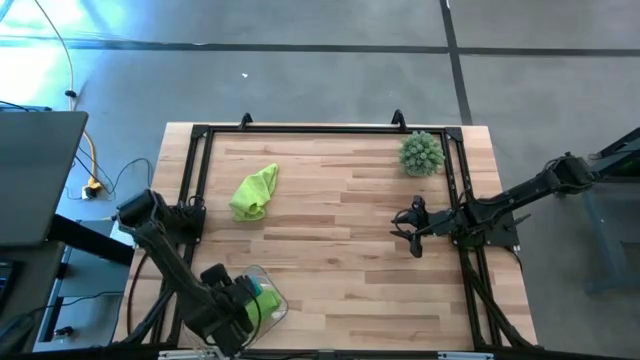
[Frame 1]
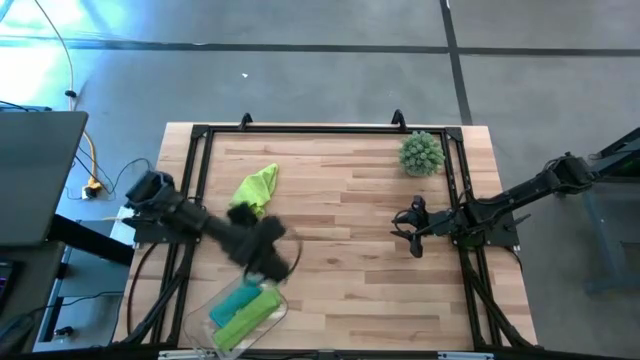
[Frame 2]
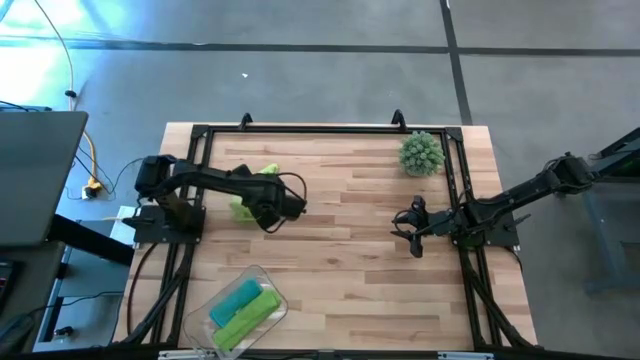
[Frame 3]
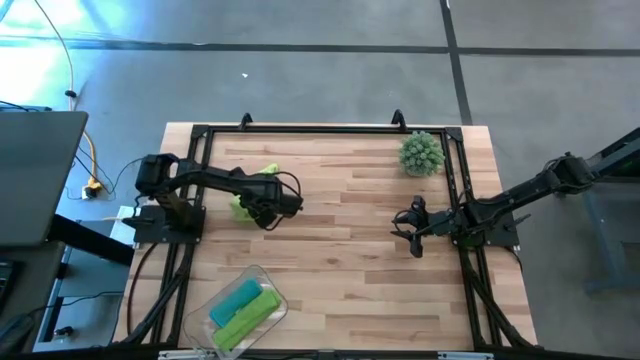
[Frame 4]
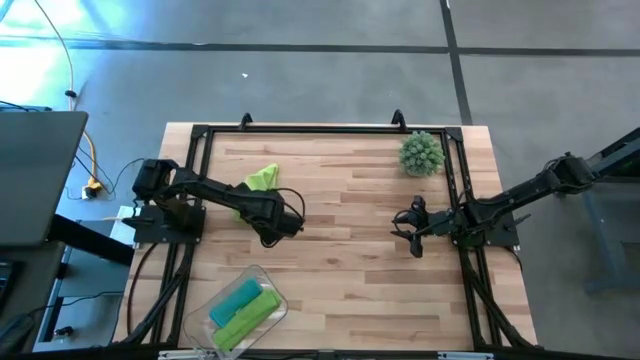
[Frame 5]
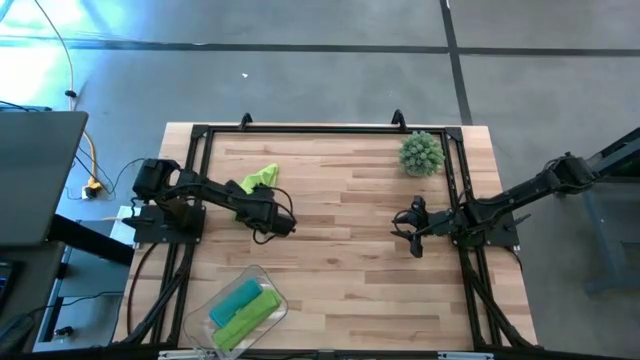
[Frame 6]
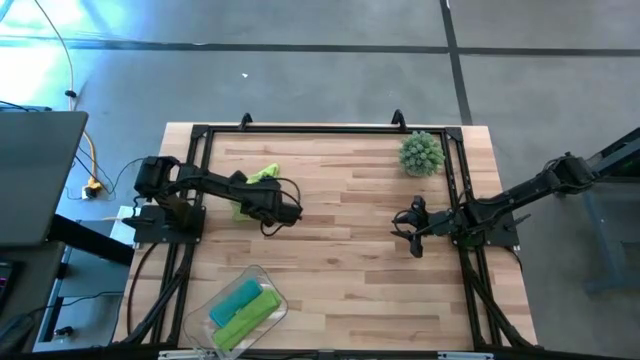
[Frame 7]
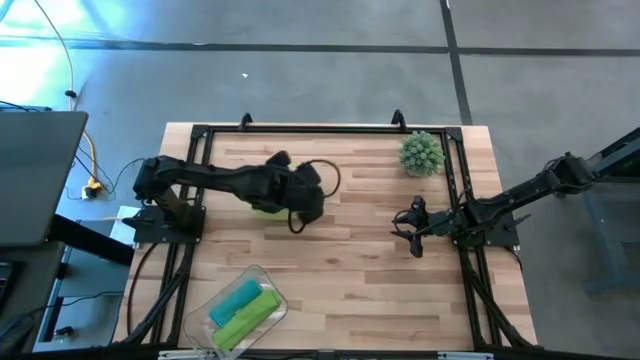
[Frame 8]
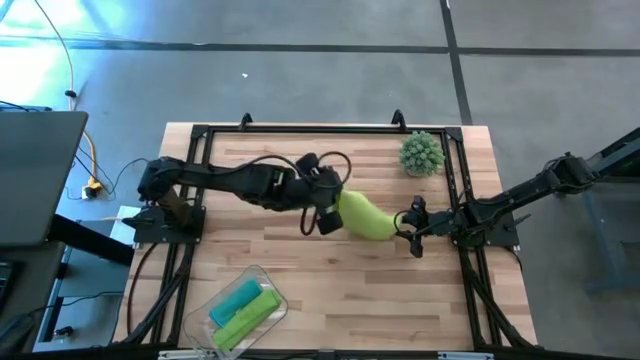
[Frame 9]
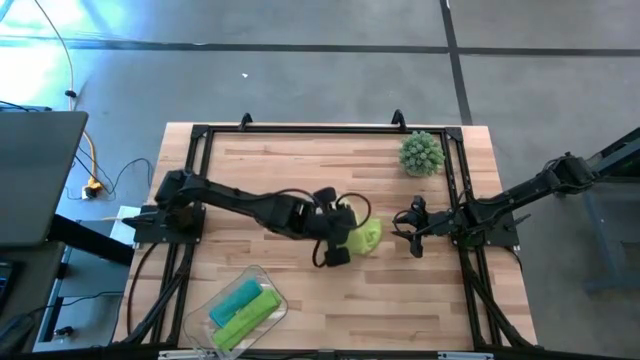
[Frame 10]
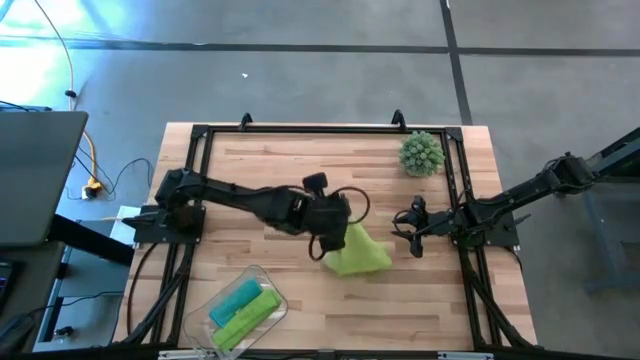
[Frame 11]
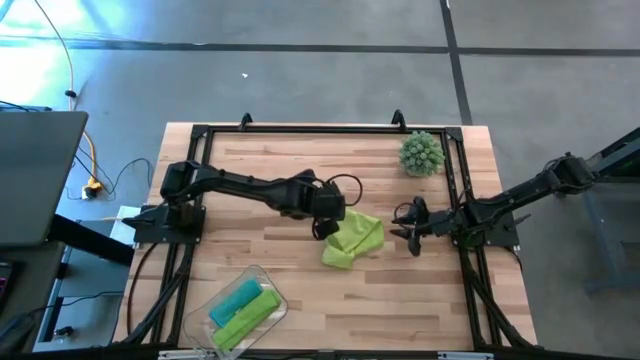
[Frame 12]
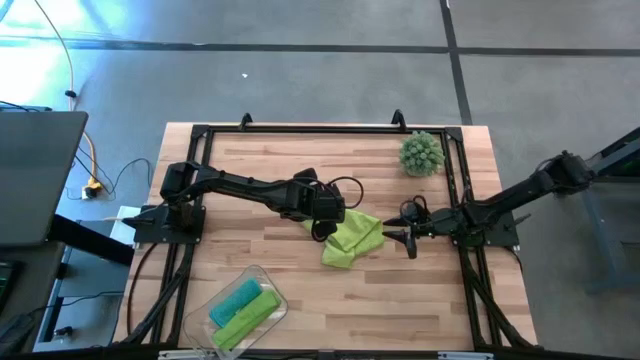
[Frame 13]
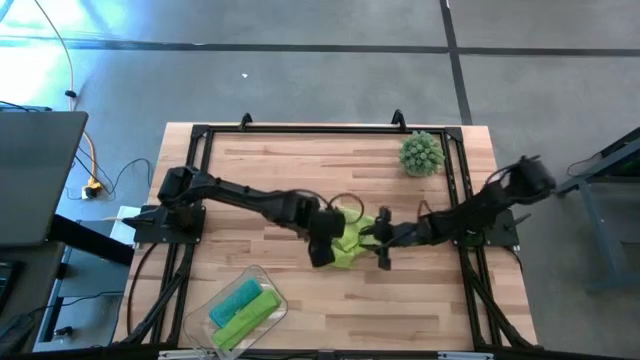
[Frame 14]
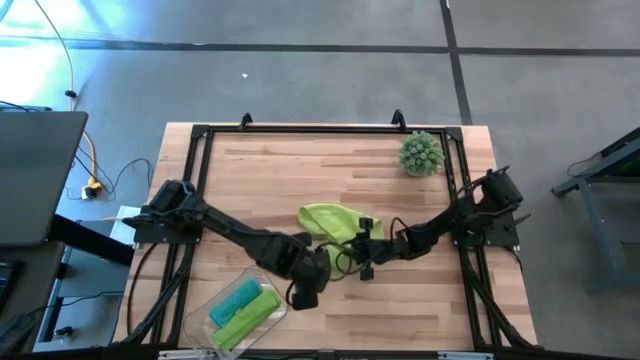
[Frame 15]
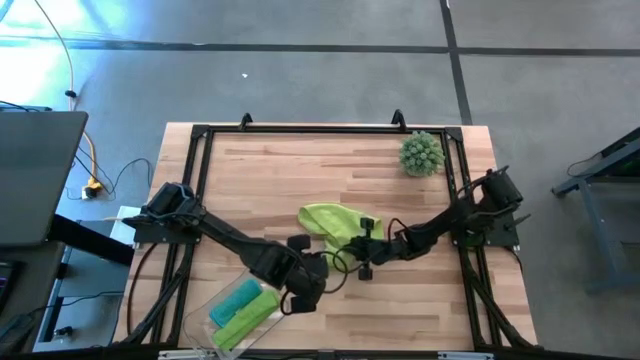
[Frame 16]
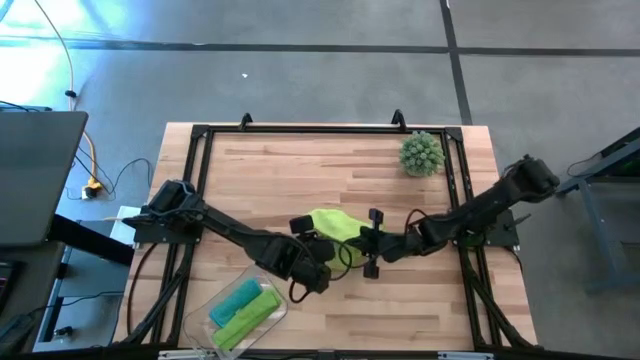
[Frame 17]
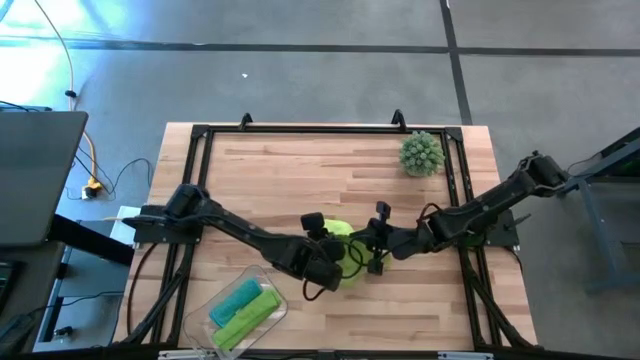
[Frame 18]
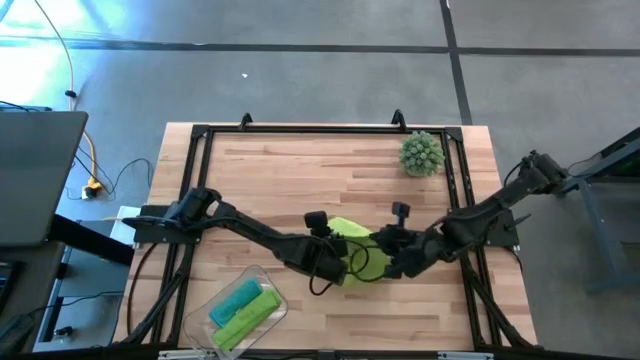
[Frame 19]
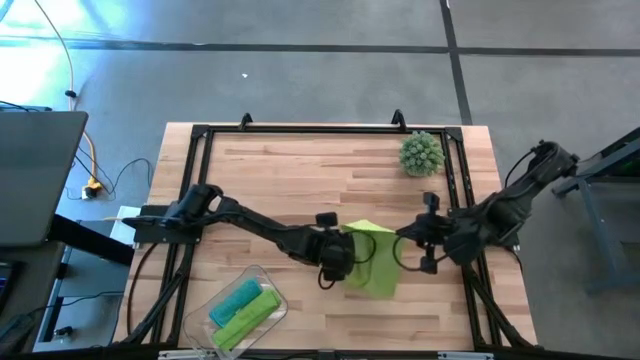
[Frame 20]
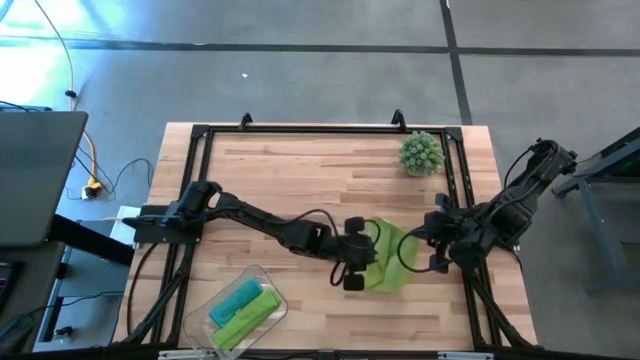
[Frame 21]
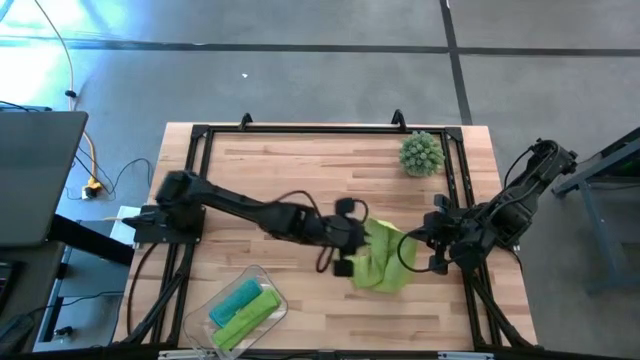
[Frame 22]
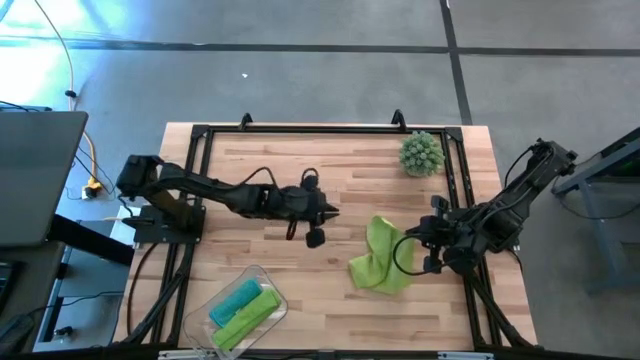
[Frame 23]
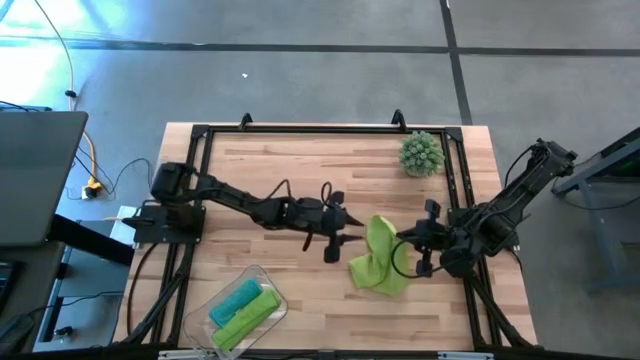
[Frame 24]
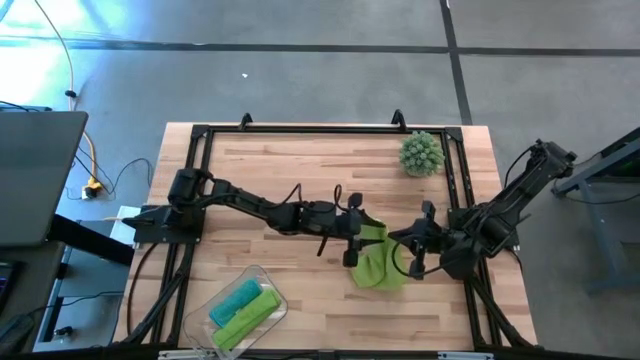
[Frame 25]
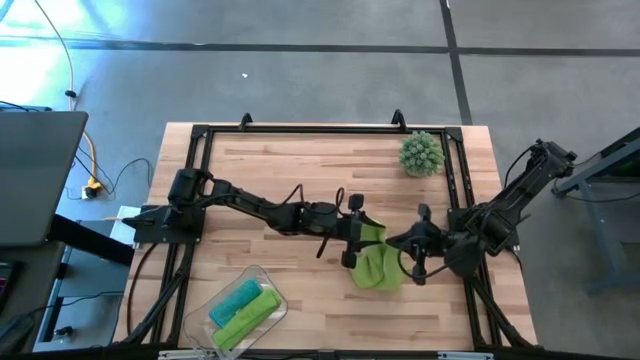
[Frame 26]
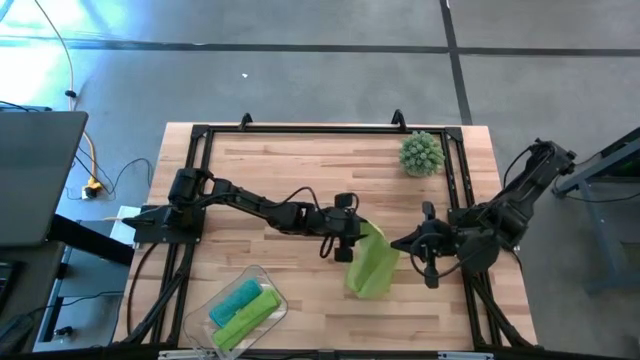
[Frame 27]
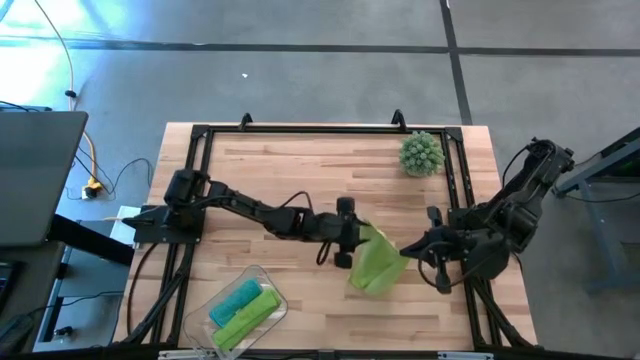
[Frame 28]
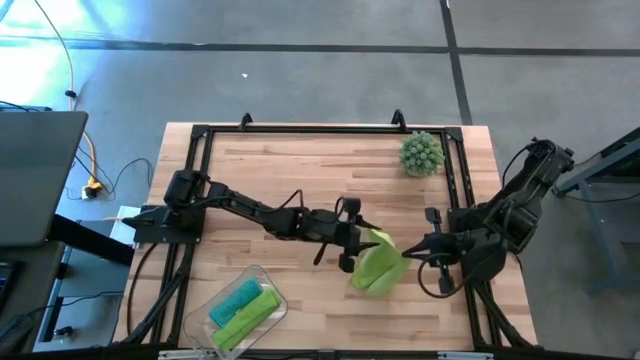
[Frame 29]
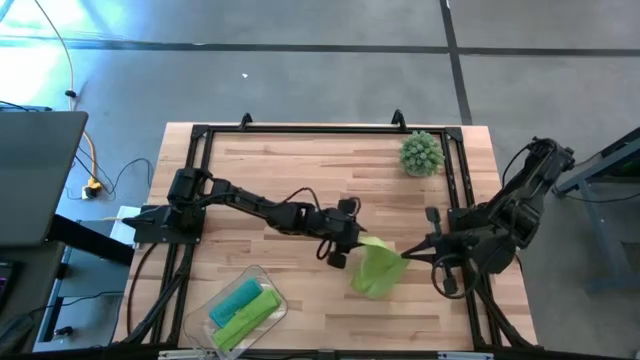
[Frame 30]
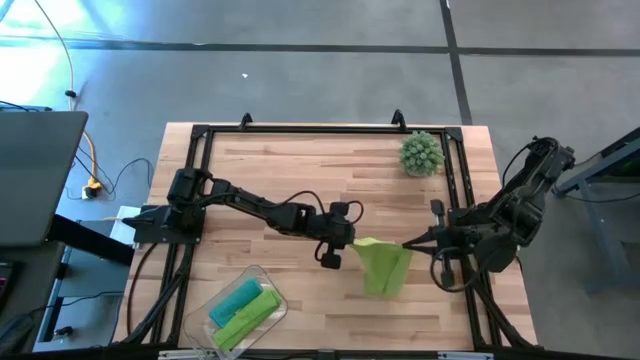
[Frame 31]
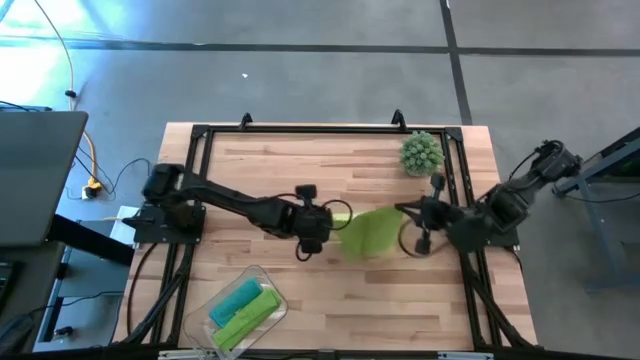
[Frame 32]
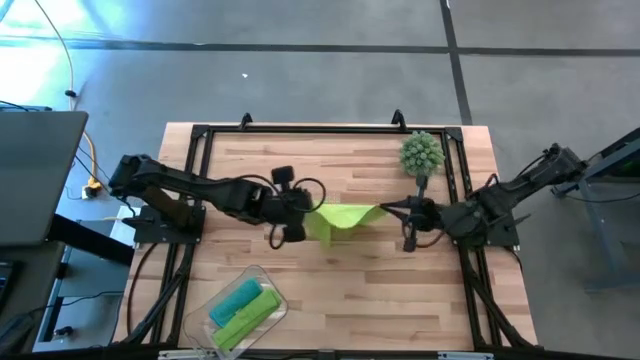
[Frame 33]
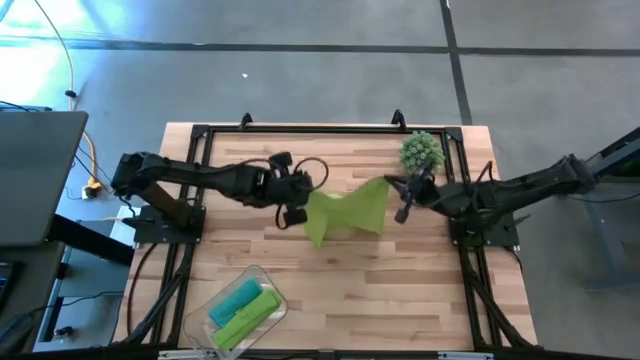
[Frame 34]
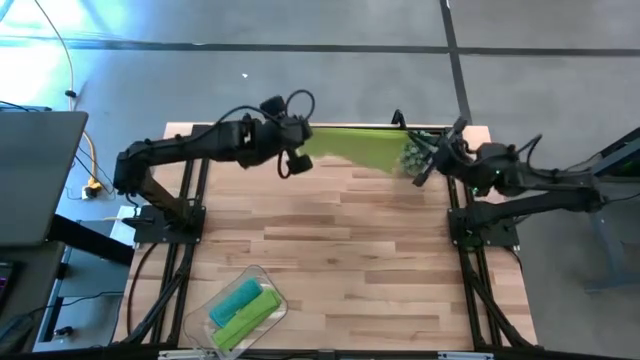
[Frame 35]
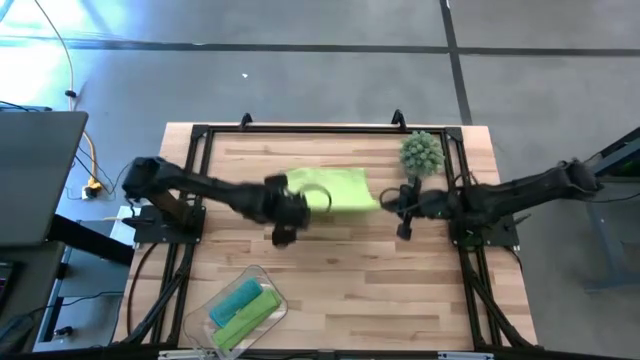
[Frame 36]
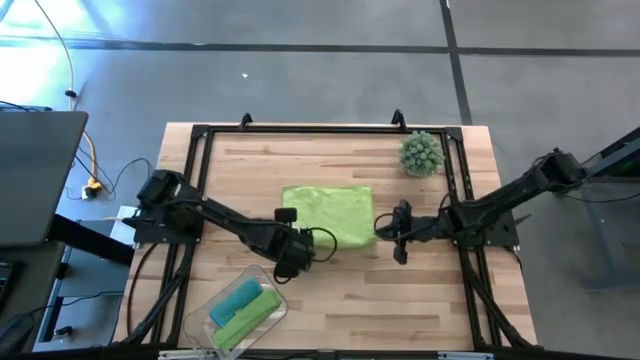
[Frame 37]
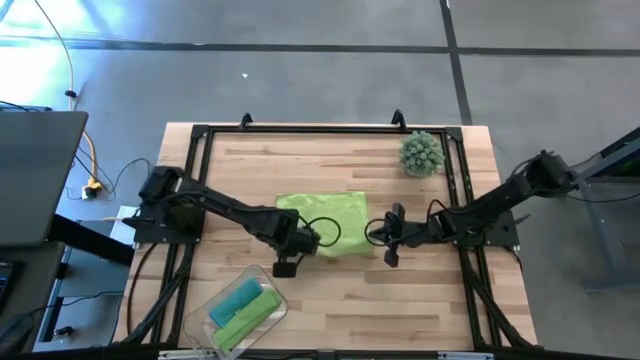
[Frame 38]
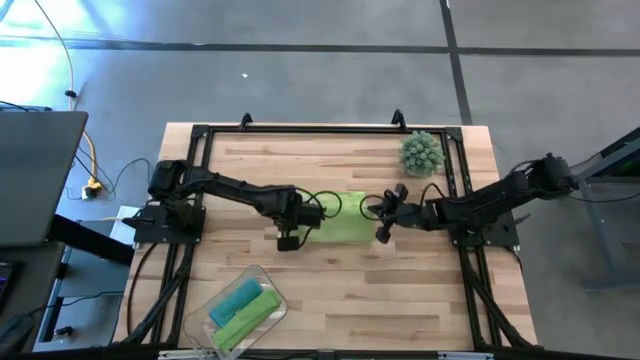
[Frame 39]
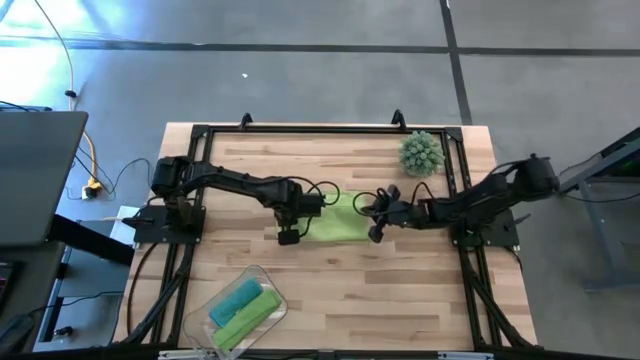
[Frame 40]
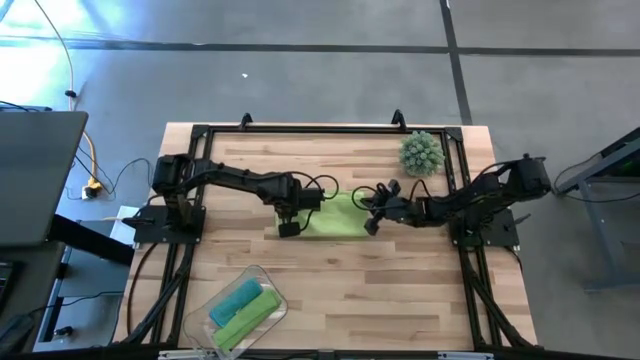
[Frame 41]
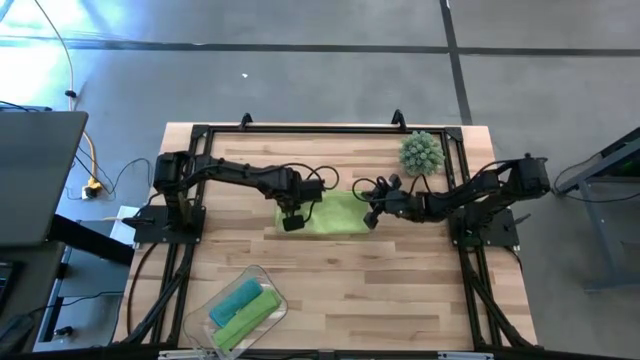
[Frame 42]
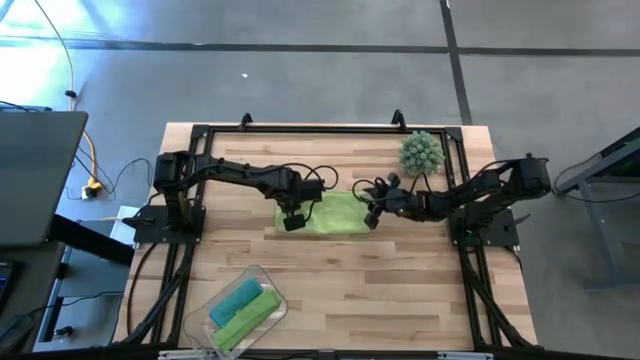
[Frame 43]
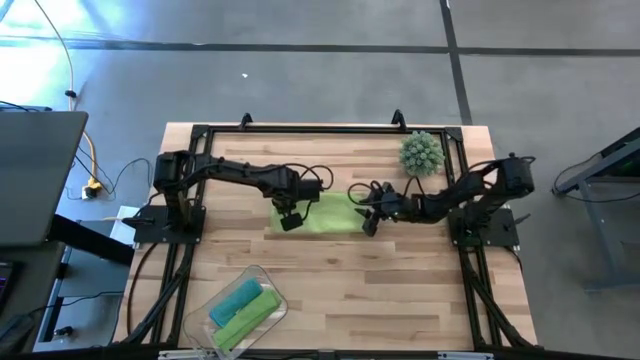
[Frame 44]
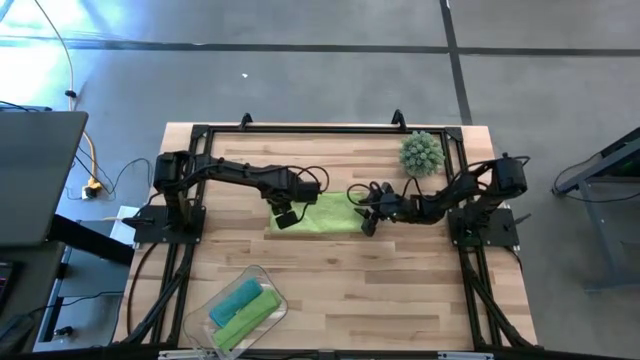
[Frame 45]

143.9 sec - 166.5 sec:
Task: Roll microfiber towels into tight, uniform cylinder then place into a basket
Roll the light green microfiber cloth
